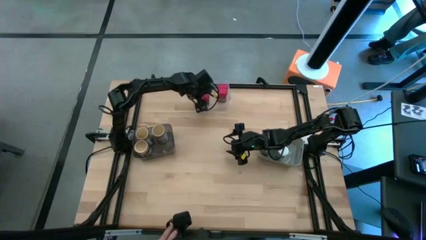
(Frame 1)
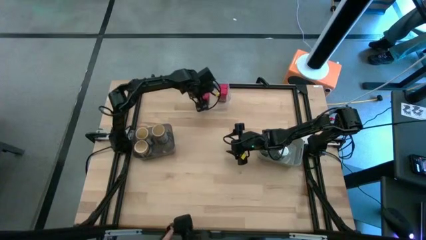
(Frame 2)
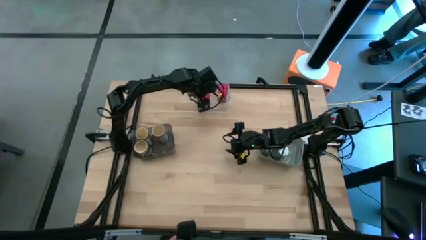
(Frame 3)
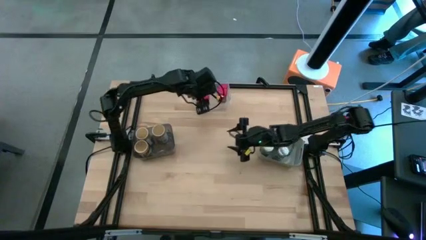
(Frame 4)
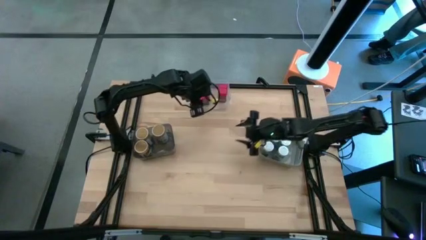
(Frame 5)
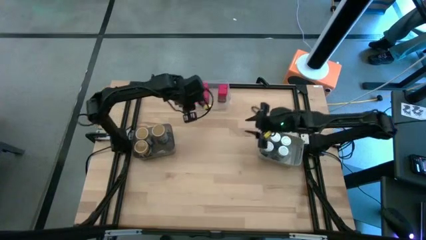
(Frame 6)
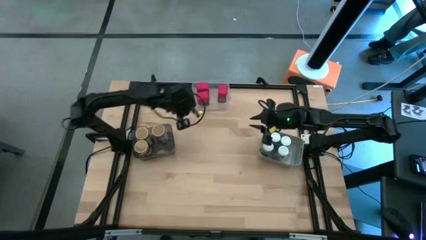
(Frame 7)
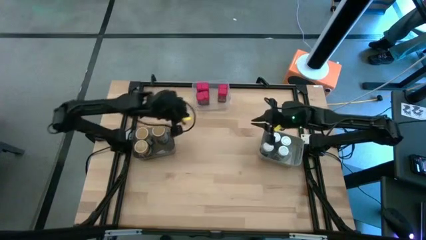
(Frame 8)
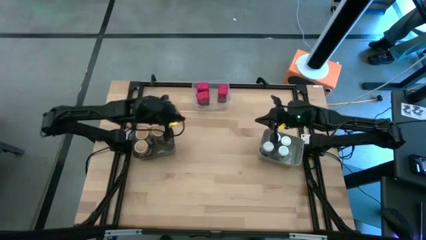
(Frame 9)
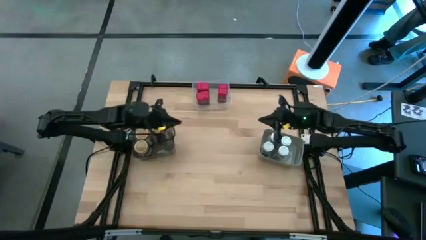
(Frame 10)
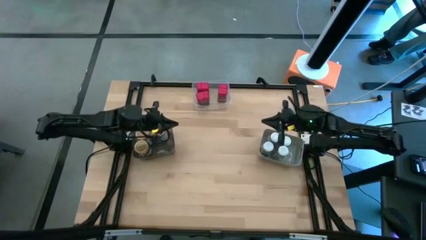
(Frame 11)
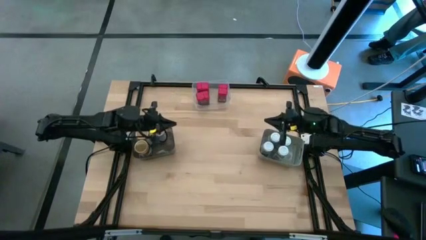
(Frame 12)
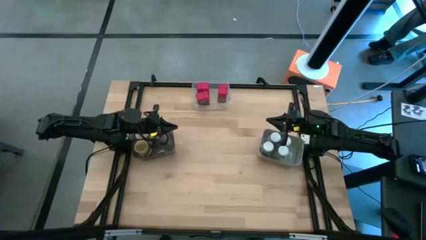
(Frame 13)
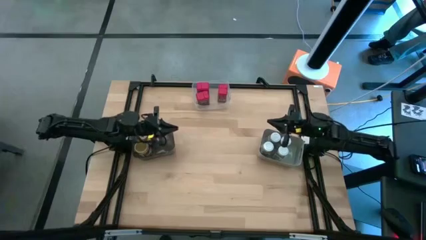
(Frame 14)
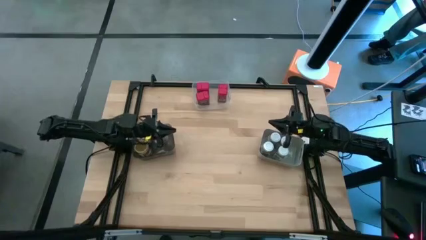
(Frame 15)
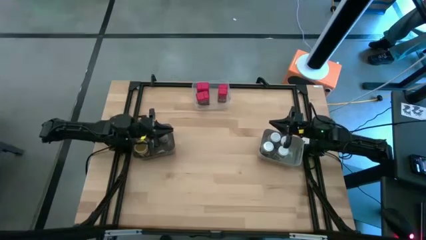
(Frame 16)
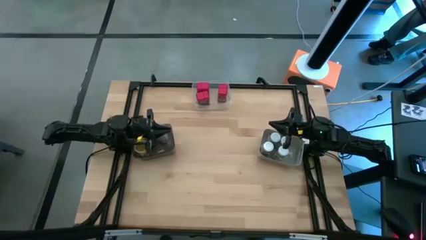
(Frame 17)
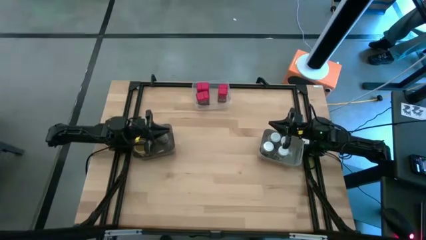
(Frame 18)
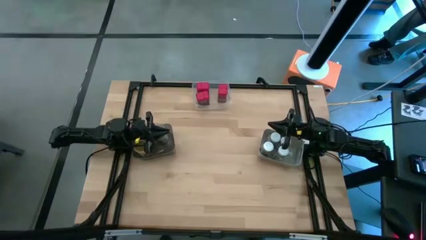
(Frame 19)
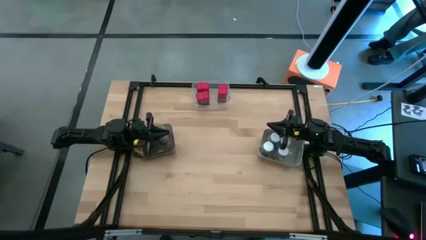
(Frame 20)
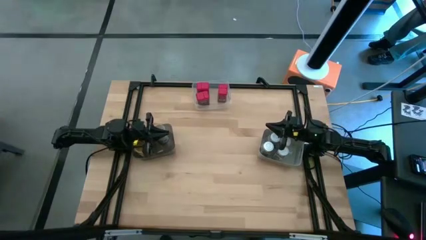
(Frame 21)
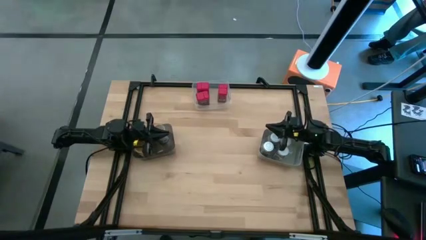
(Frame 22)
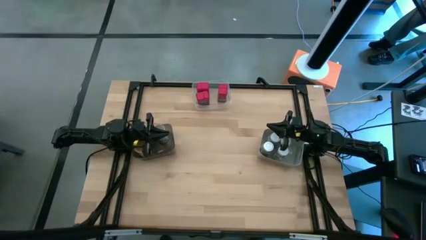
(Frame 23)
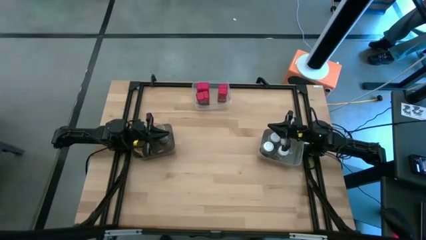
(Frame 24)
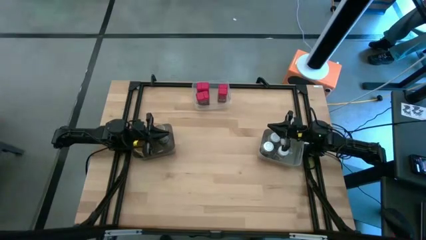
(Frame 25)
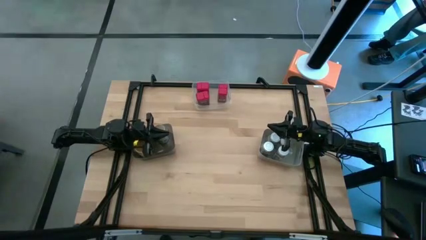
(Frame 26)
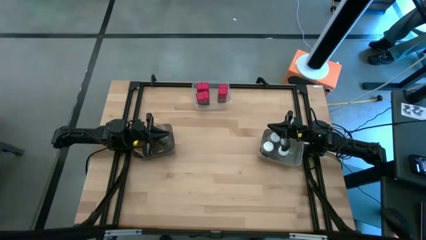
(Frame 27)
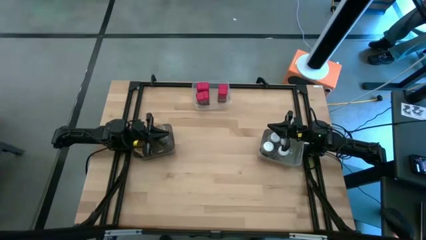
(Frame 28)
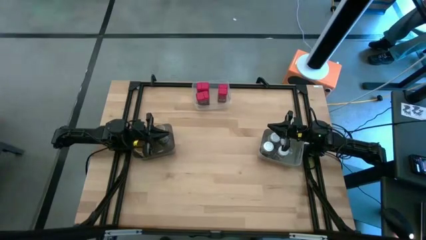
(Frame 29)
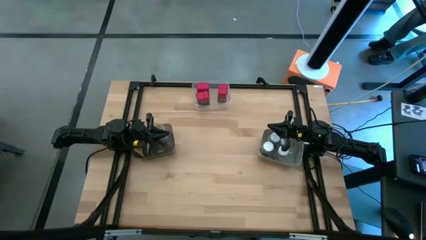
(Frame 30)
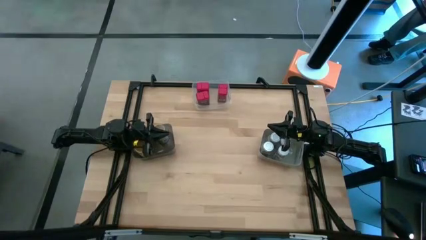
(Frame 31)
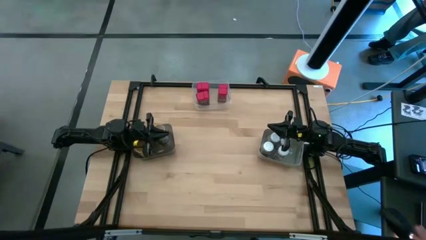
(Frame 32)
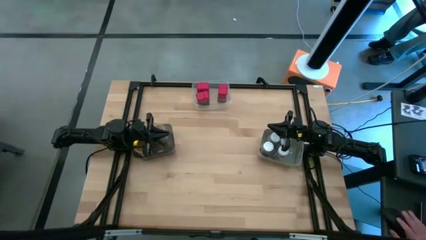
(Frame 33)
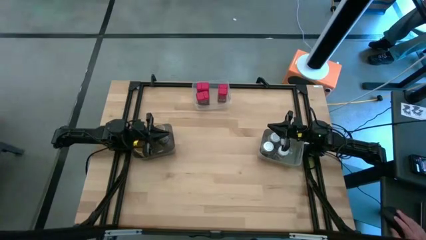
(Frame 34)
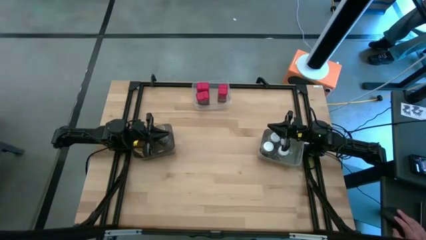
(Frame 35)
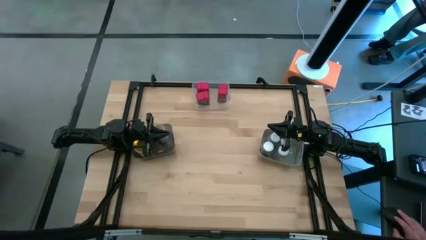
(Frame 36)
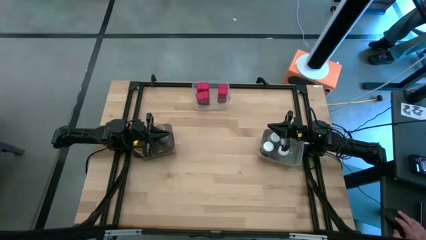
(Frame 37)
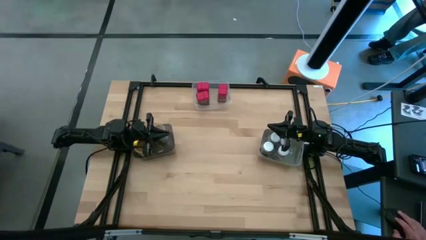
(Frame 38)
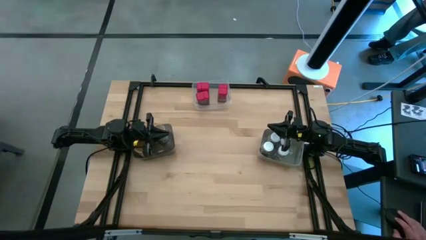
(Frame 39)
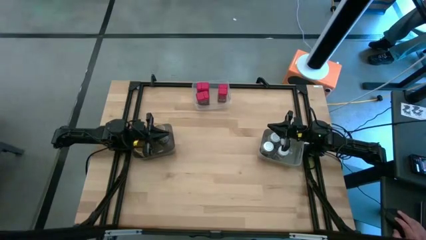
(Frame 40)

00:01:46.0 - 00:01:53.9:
Task: Sort spices by type
Return to Home Position

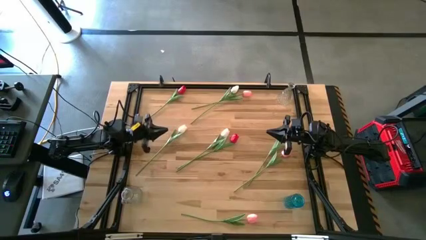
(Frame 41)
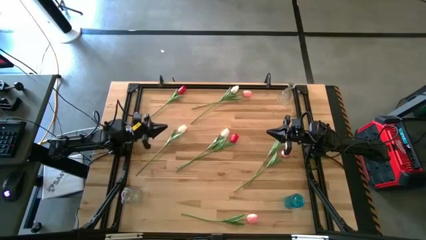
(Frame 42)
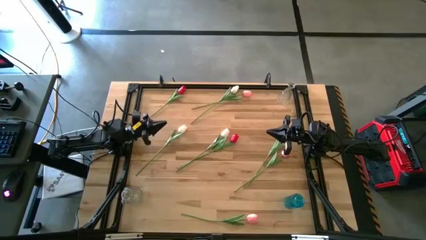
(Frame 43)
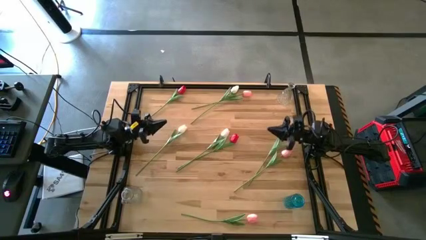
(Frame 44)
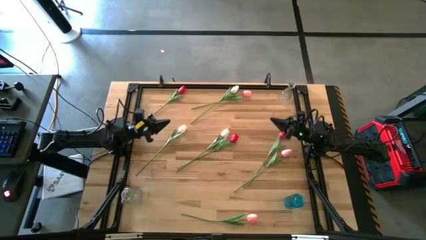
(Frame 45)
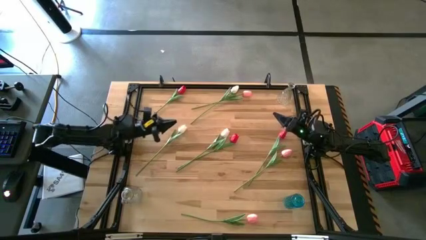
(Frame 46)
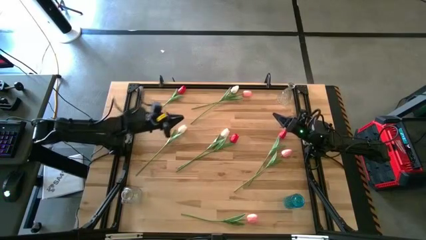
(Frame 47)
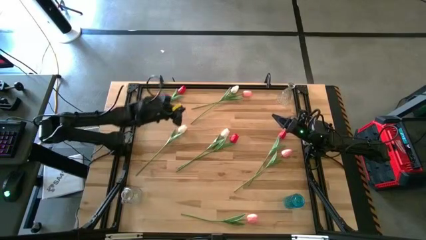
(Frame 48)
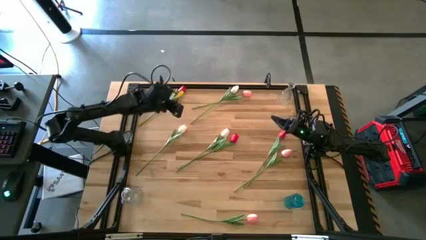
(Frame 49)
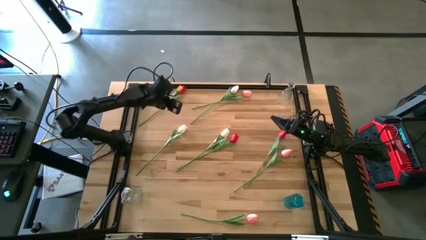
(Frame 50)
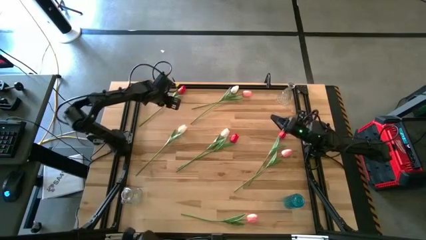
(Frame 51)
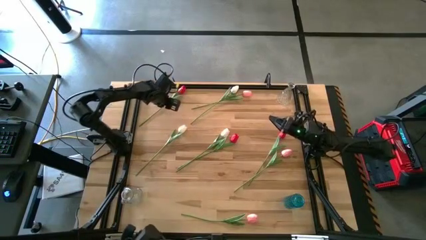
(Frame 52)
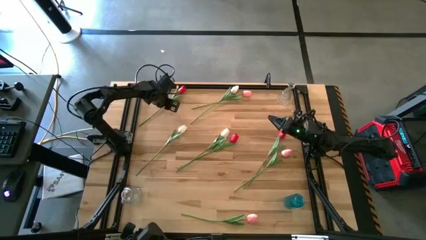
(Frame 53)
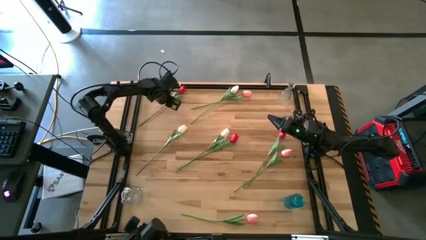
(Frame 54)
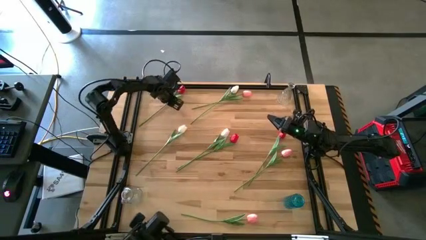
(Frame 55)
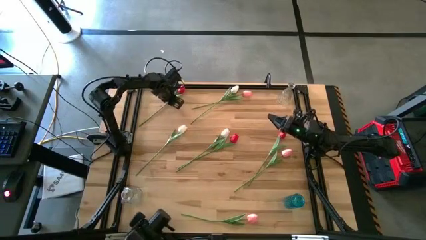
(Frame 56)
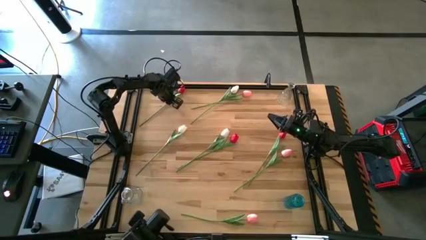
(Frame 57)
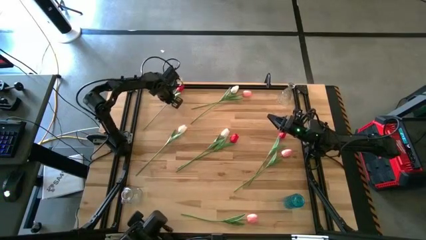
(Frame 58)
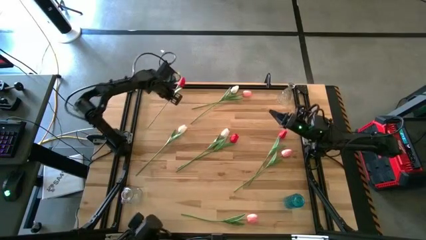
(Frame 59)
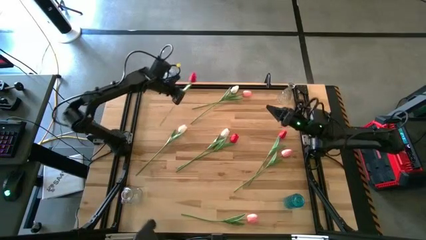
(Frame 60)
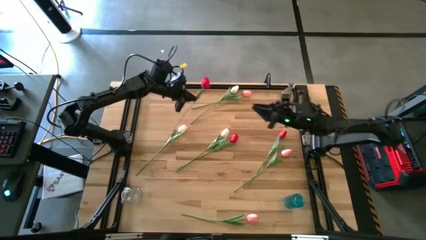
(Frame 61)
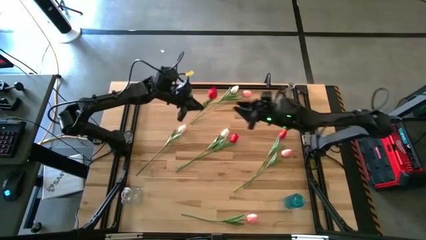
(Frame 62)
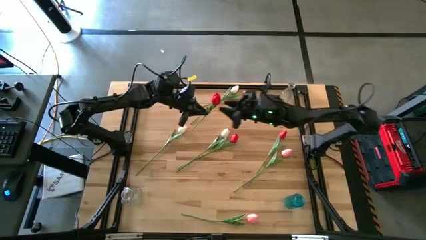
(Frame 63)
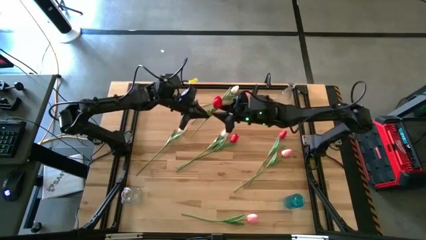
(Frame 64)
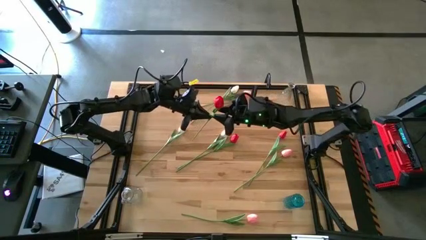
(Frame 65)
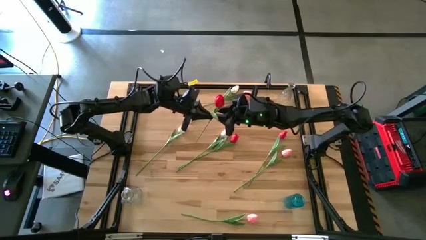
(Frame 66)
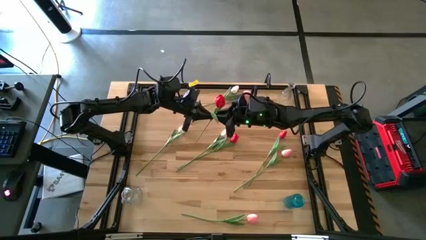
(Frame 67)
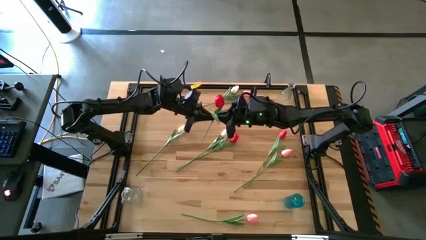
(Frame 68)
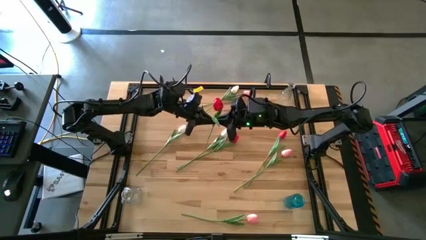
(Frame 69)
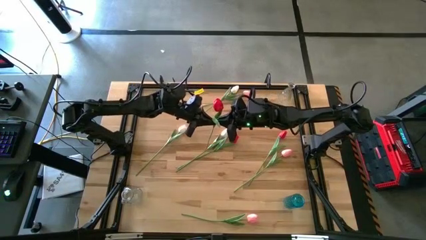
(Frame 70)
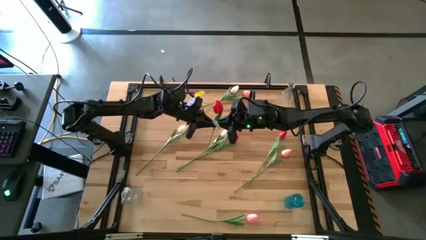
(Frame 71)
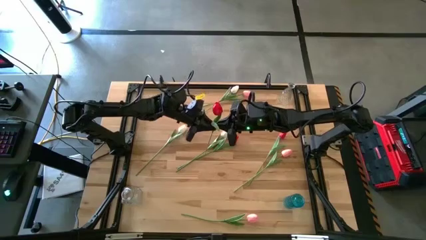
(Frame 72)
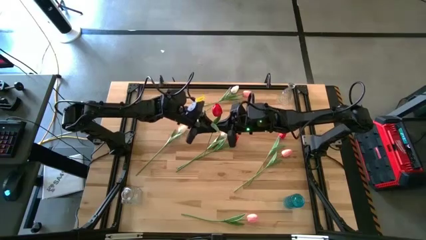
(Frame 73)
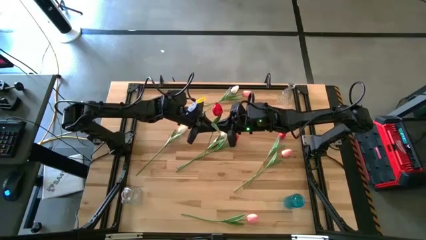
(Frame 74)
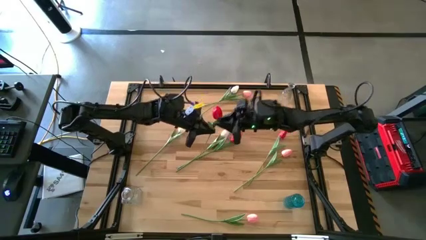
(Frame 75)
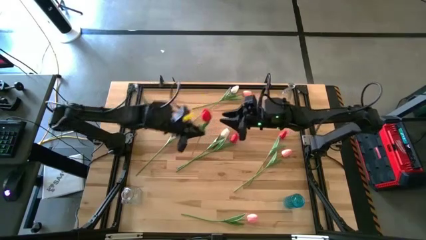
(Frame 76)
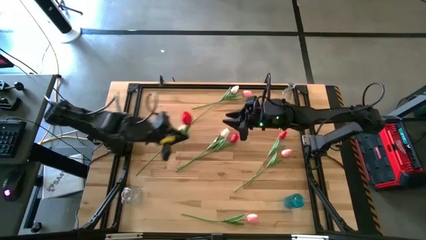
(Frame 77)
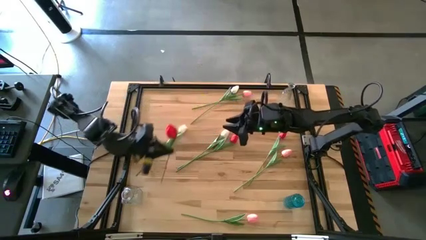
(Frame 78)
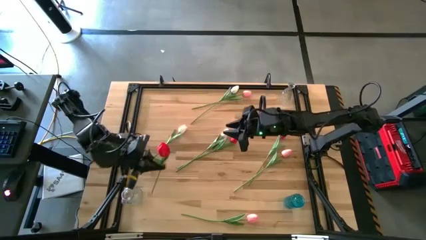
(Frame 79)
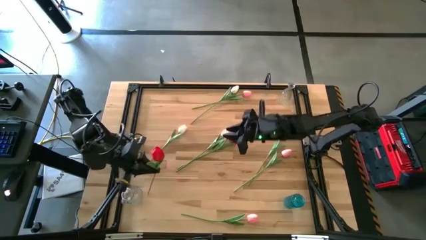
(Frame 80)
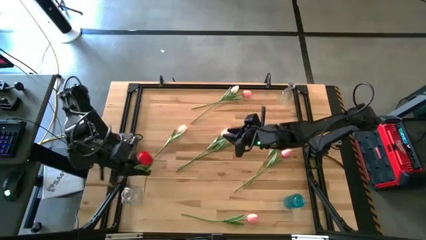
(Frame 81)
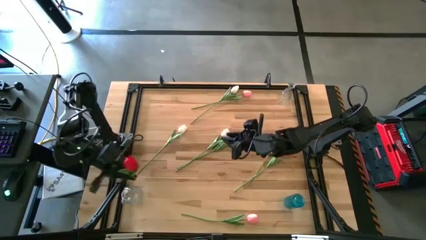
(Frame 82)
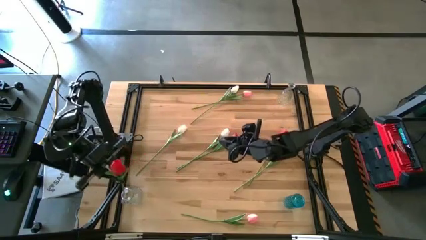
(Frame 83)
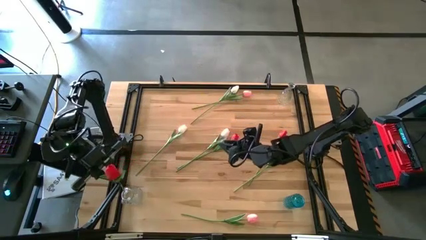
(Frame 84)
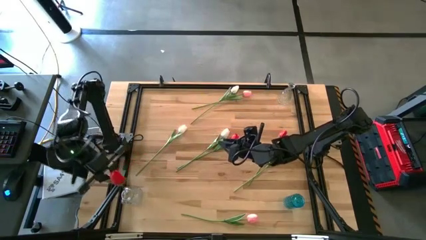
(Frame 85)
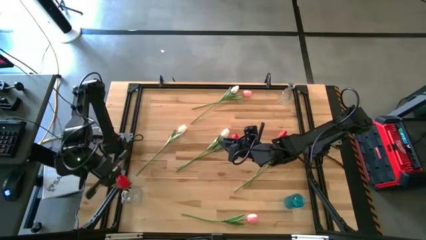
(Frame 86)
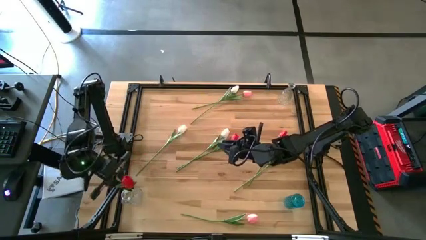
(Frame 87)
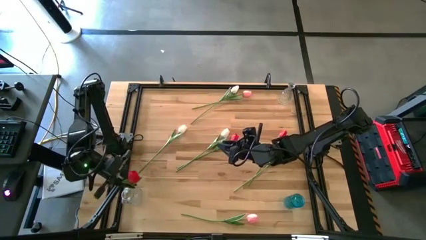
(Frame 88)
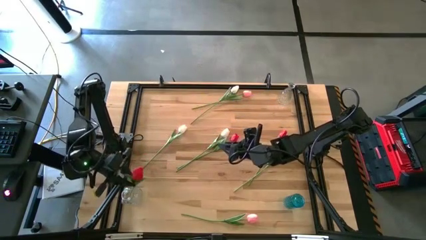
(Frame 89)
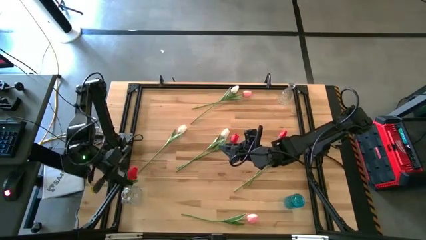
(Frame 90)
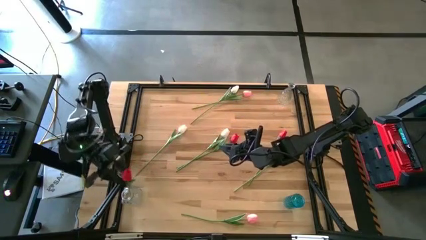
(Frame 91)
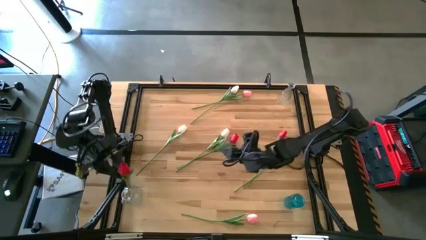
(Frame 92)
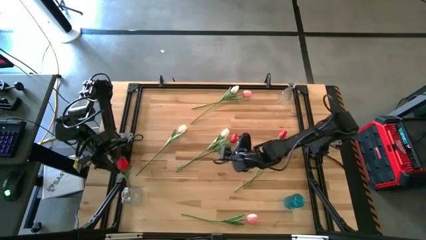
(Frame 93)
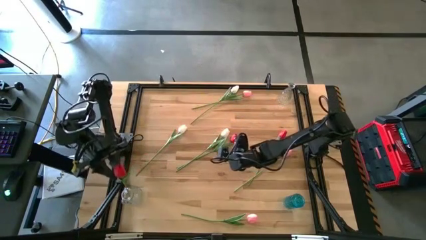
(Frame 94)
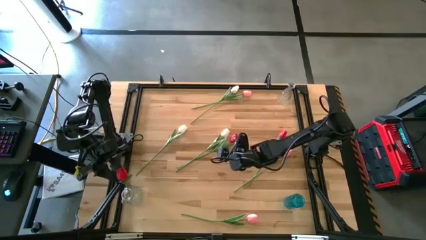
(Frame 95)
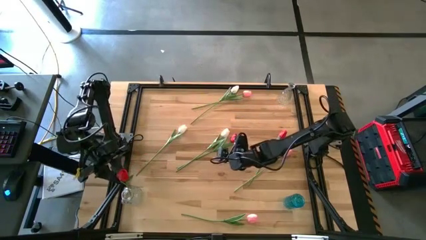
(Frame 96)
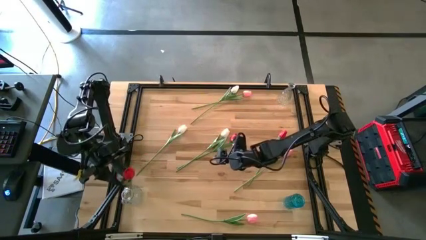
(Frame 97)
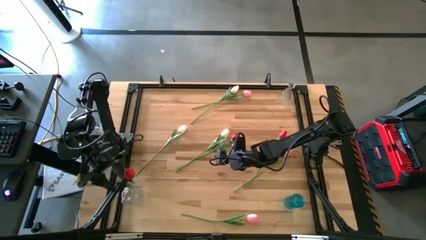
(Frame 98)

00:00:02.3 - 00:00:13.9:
Task: Sort flowers into vase by color
Put the top left red tulip into the bottom transparent vase
